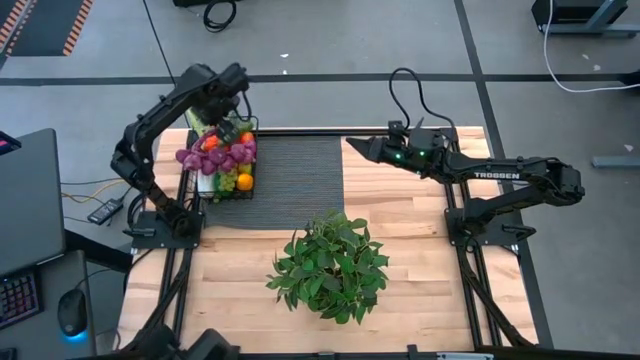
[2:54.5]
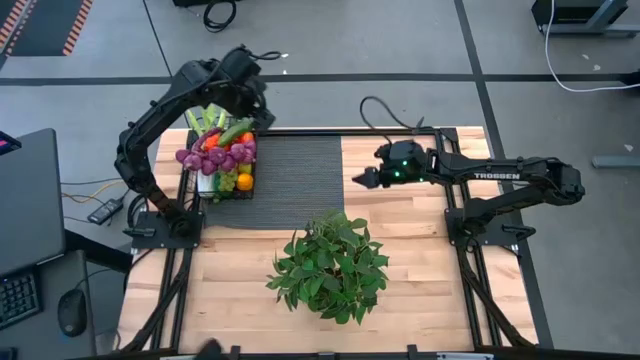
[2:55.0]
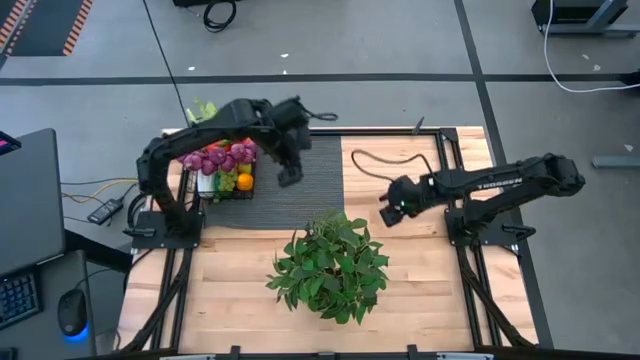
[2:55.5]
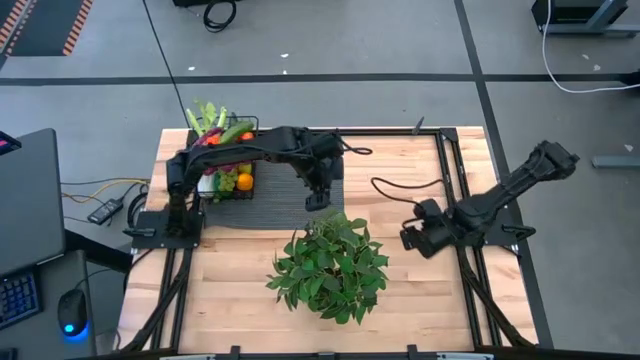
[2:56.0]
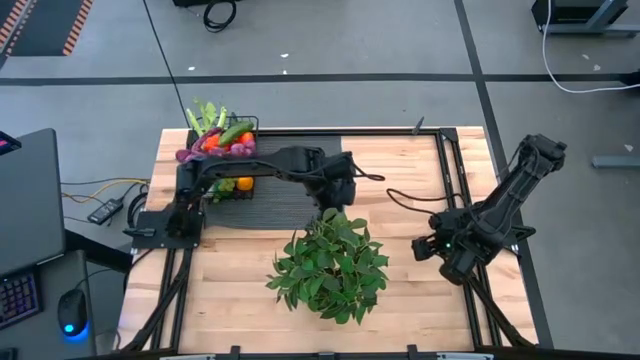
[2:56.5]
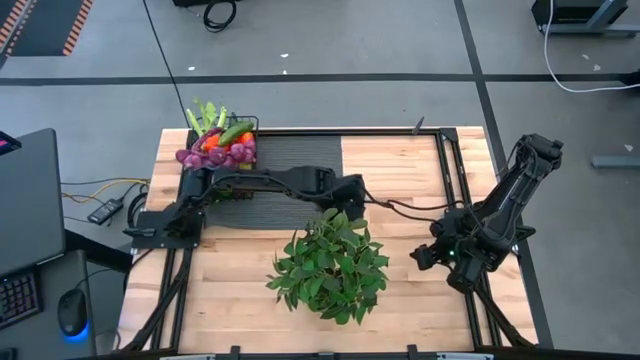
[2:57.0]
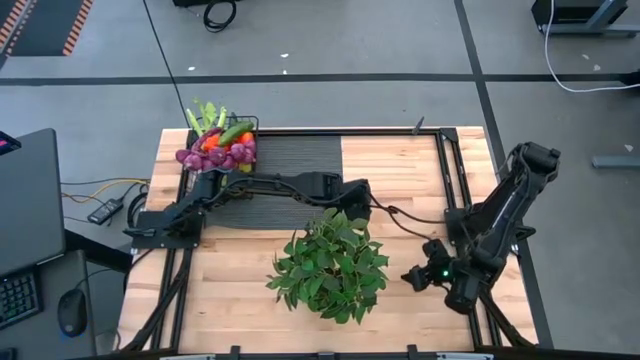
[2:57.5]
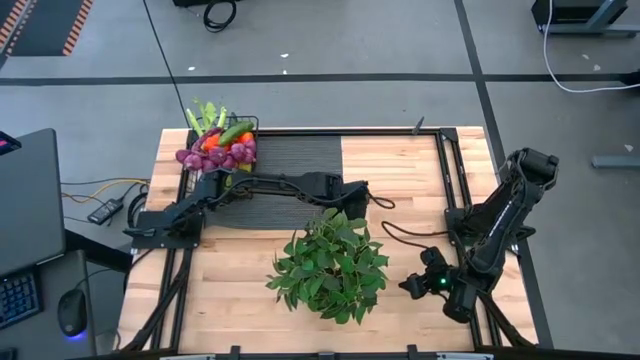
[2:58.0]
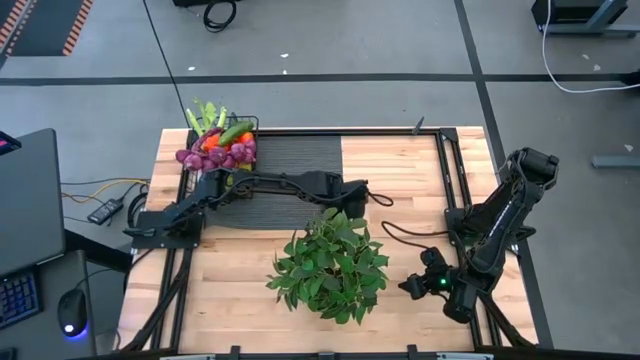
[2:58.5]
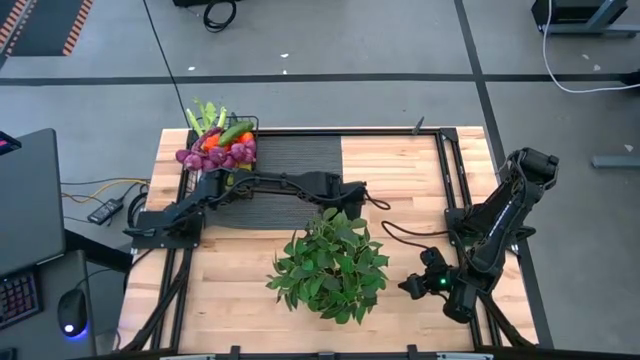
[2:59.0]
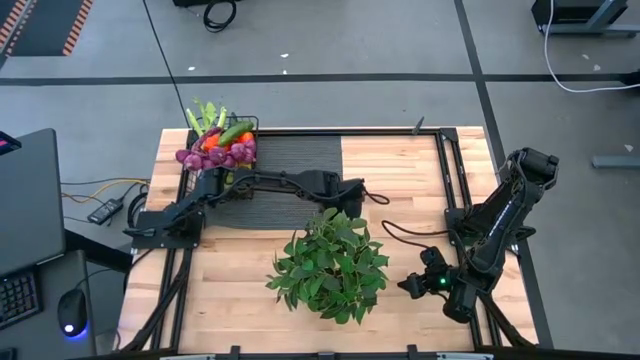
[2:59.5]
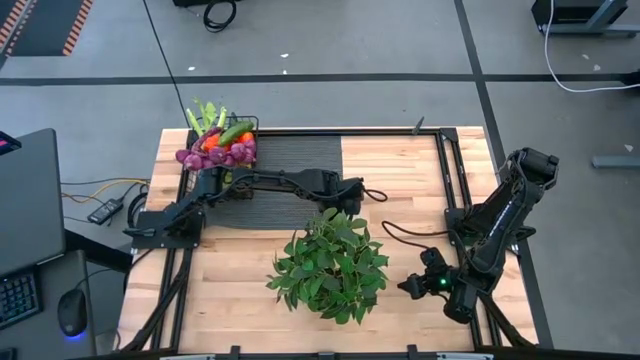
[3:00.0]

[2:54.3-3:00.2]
Task: Build produce basket
Put the orange into the wire basket

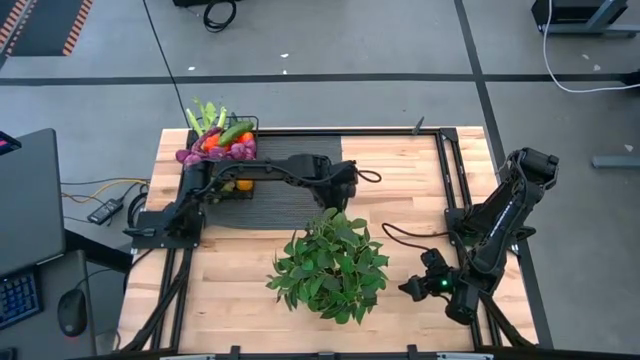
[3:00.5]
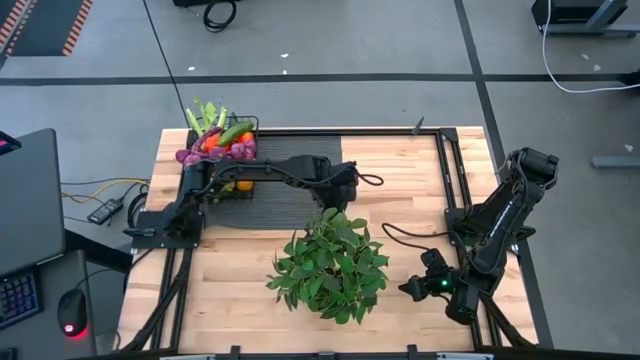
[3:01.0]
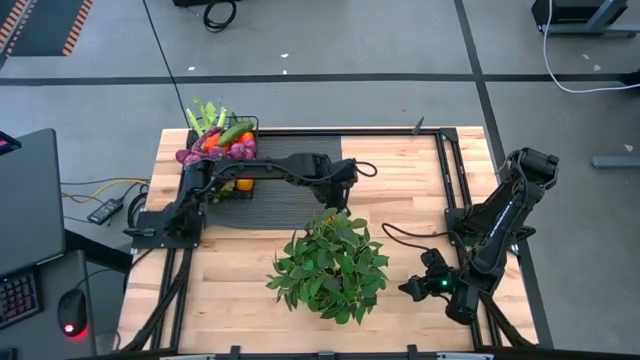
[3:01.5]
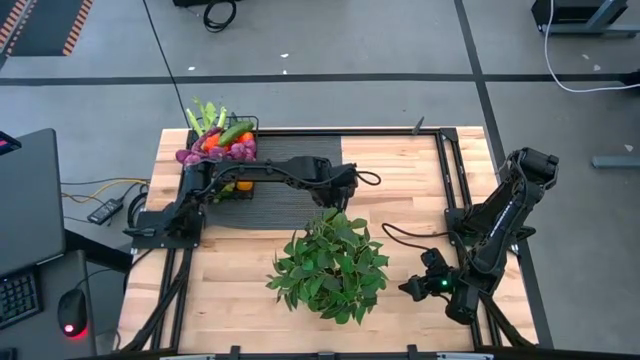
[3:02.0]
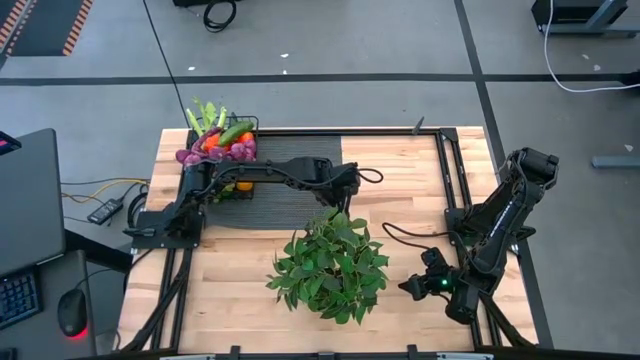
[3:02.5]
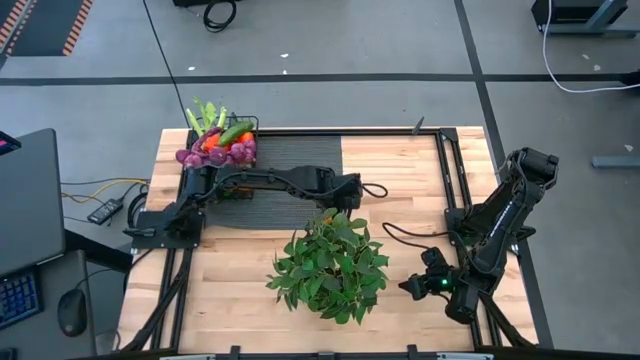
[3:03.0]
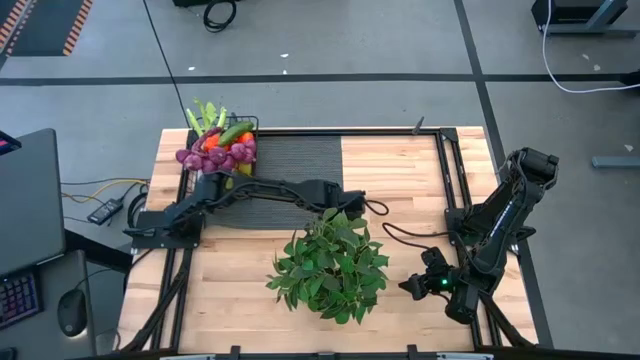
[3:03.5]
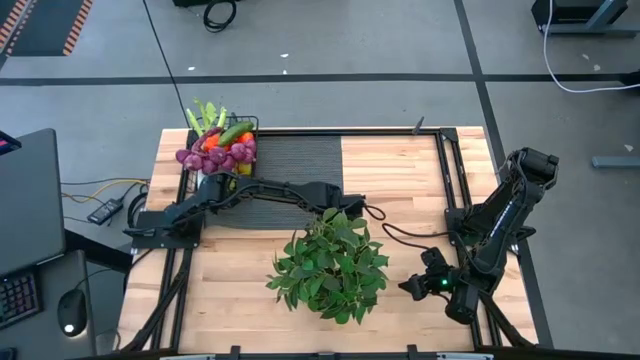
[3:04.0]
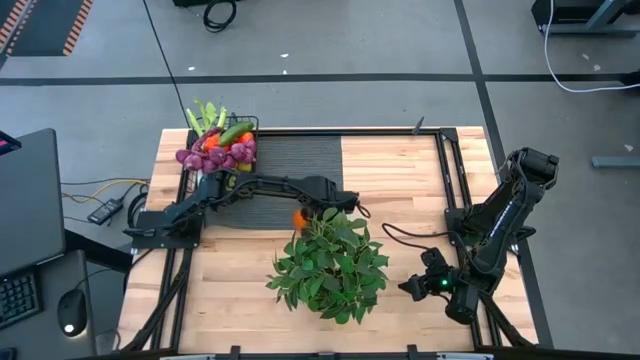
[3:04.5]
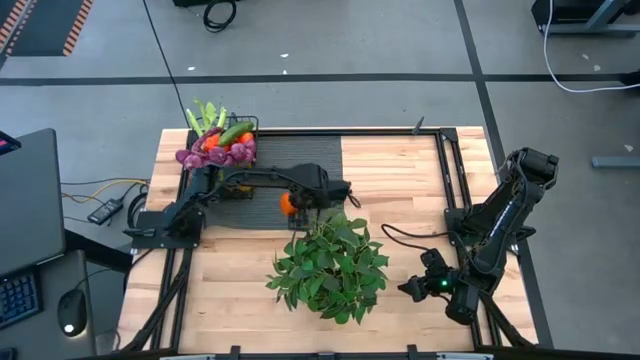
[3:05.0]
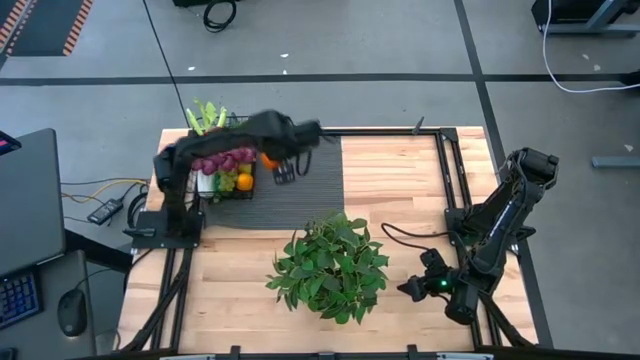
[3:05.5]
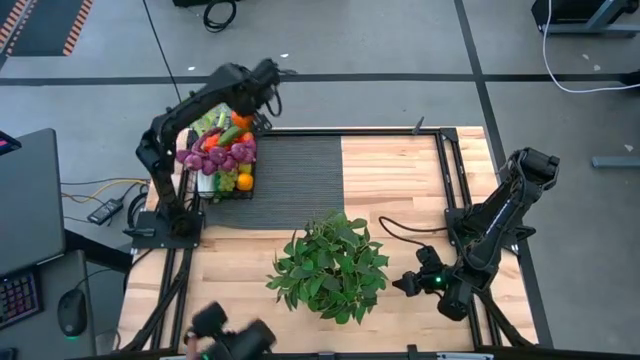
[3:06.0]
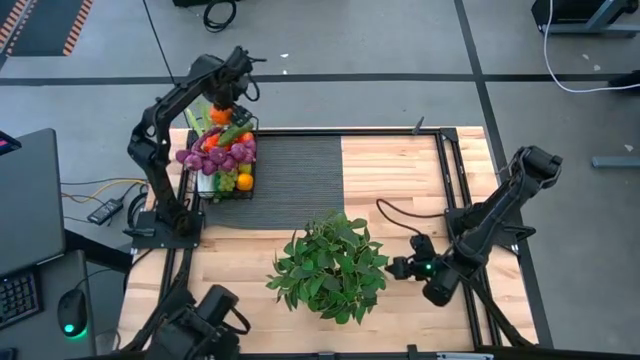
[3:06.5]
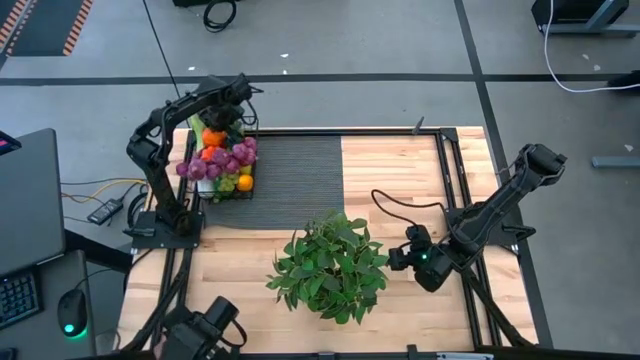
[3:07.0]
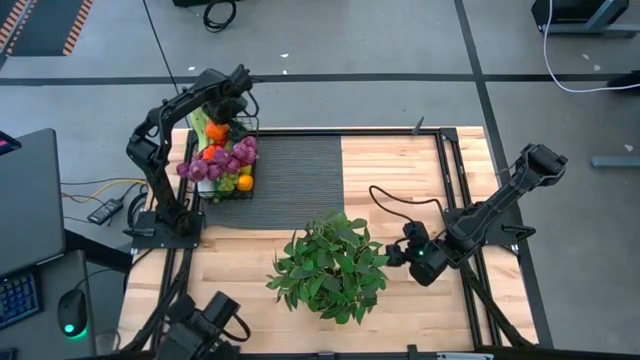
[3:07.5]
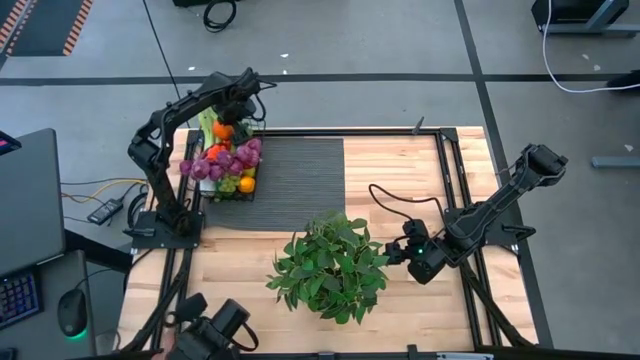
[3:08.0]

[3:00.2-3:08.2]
Put the orange into the wire basket

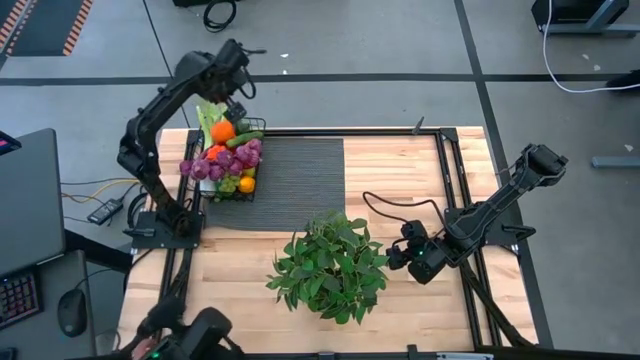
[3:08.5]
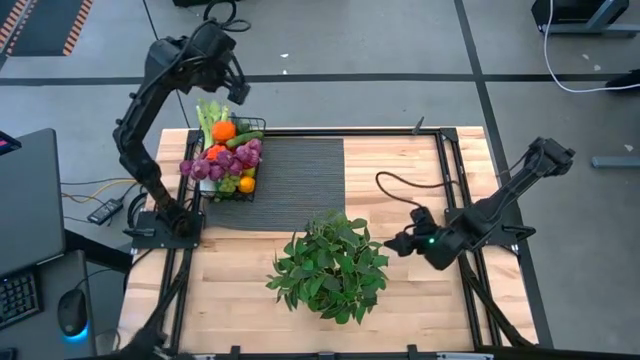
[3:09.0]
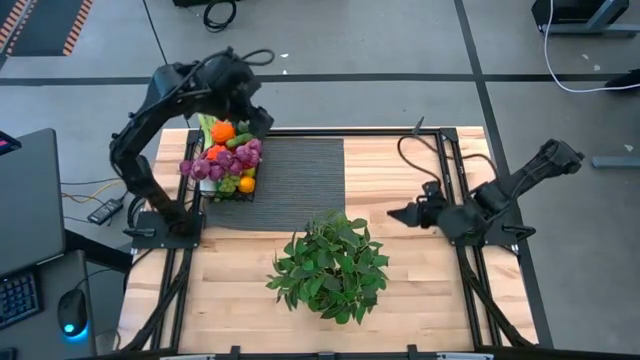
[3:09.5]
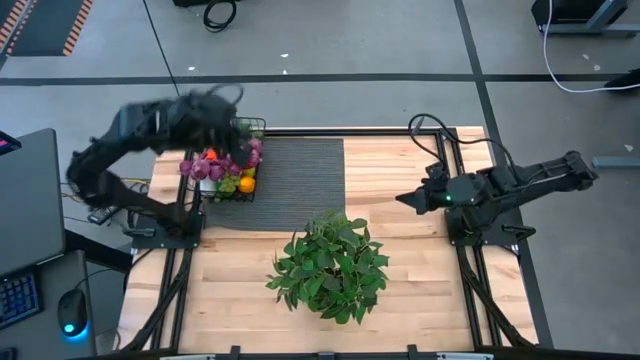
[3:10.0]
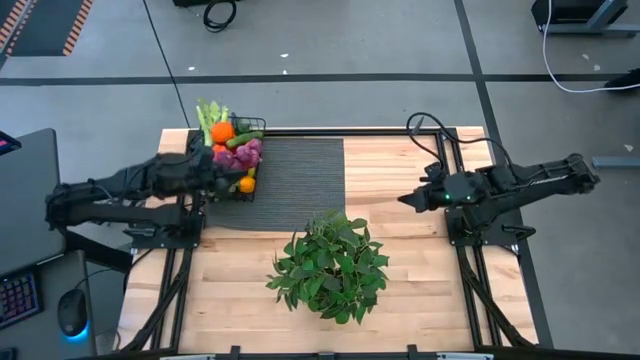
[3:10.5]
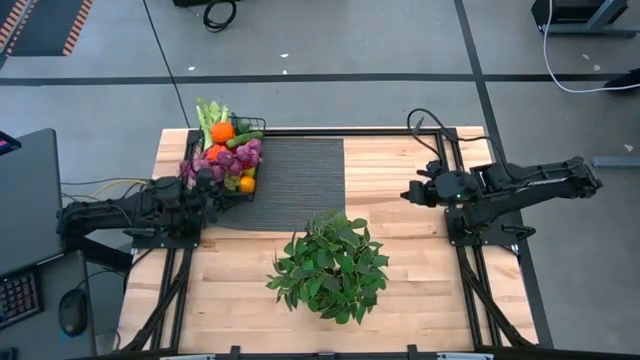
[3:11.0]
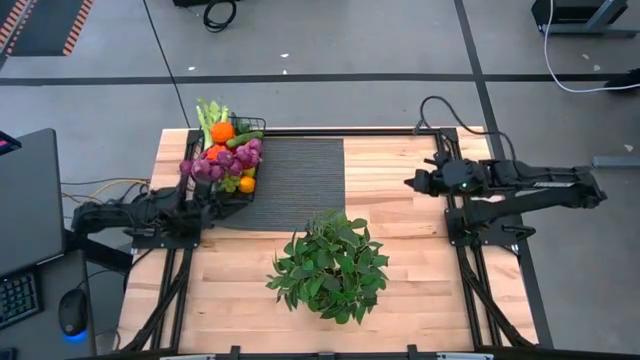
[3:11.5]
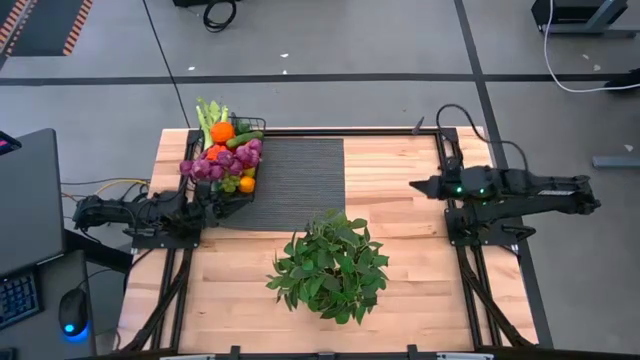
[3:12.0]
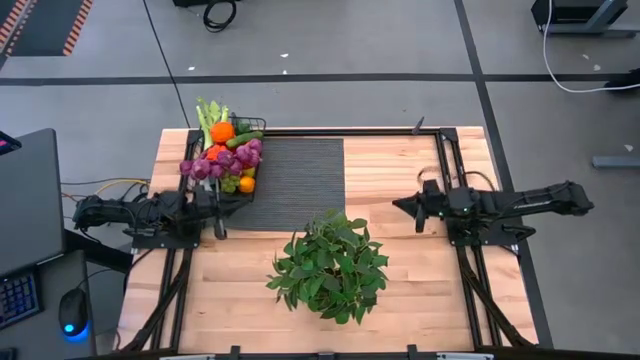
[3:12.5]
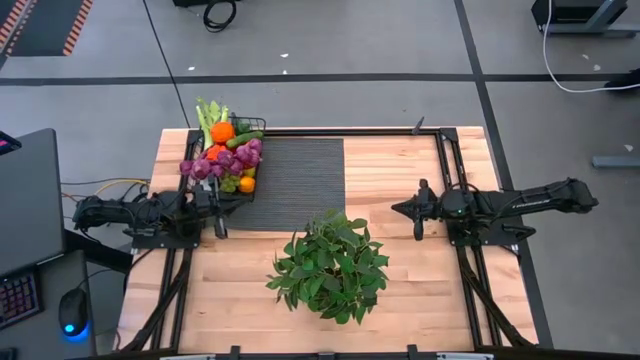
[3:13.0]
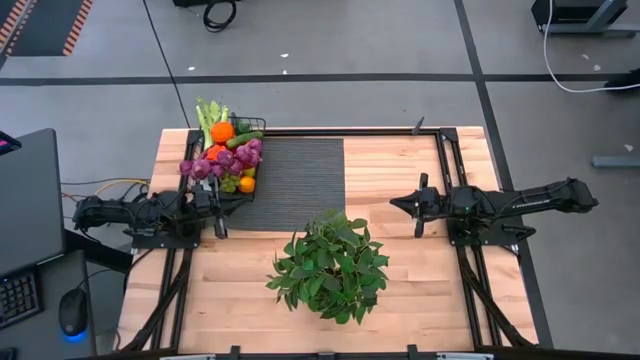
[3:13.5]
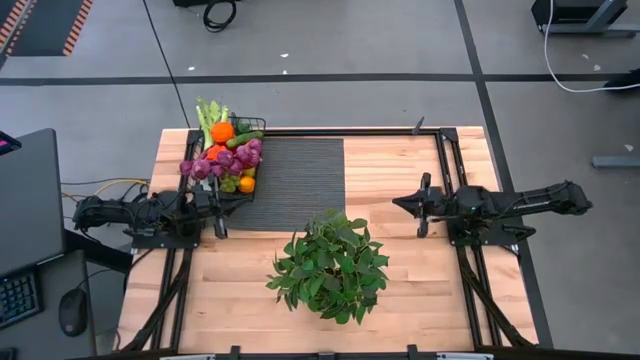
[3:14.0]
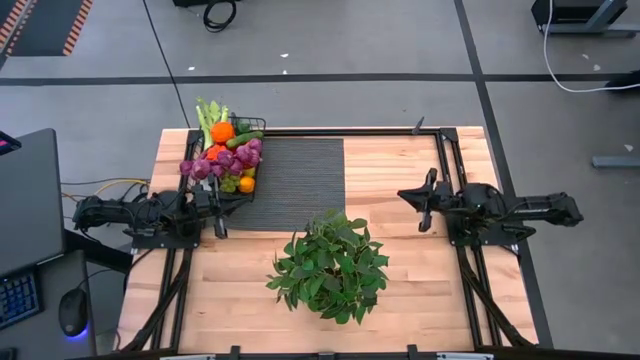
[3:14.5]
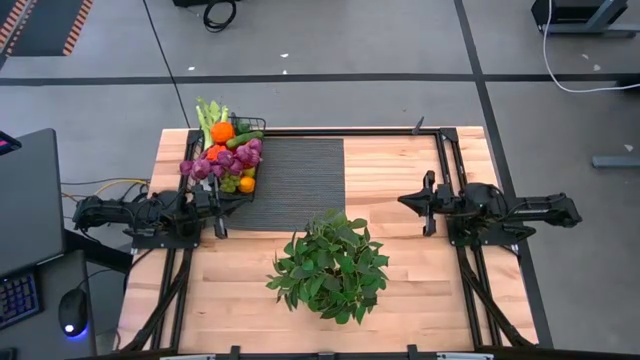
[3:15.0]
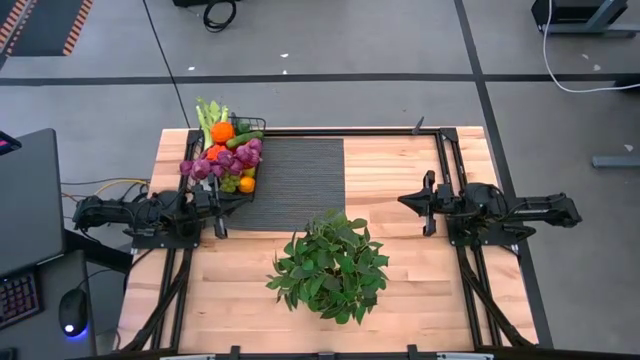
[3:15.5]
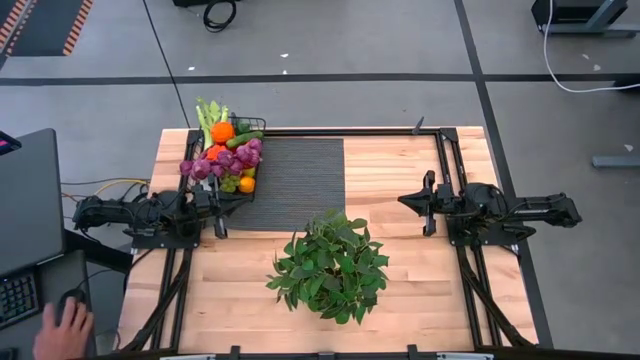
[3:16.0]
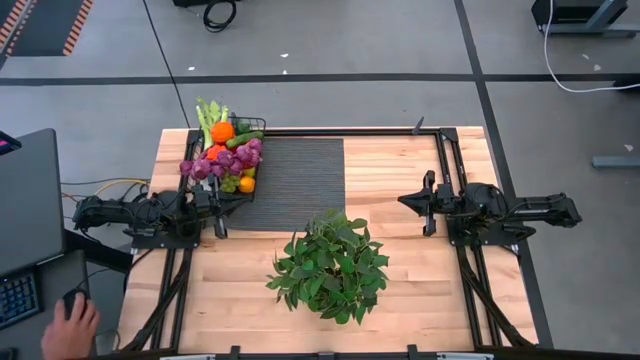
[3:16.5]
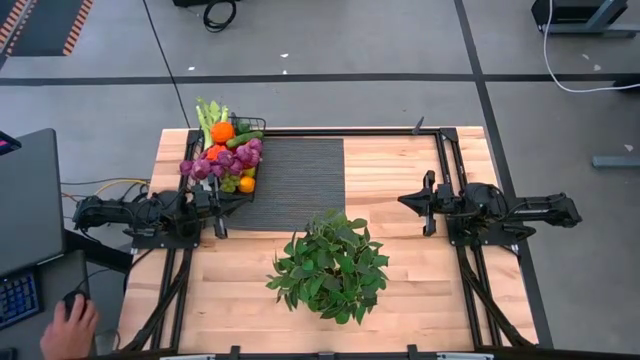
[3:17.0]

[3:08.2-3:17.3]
Return to Home Position
